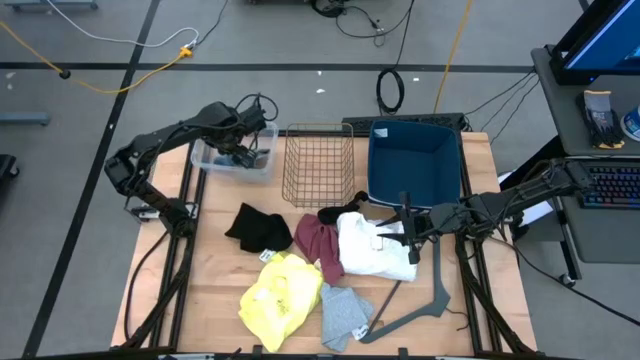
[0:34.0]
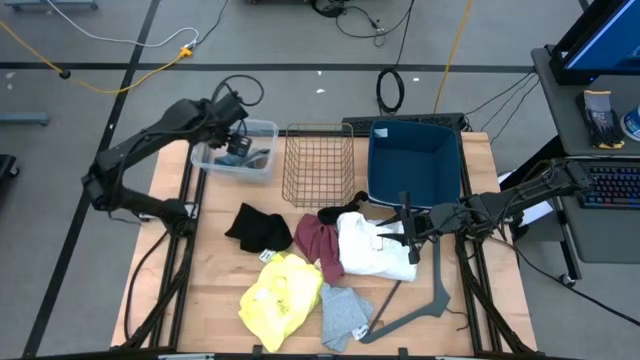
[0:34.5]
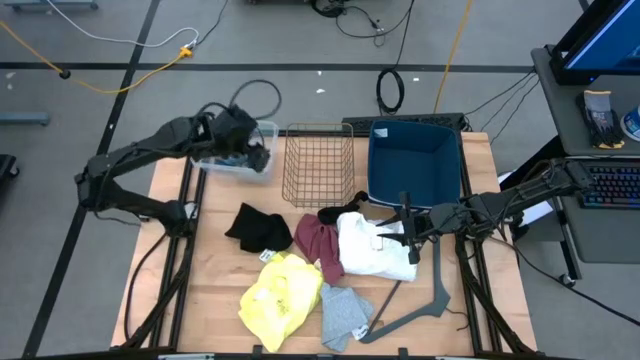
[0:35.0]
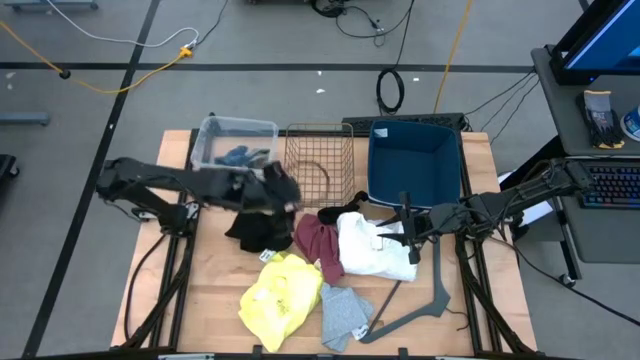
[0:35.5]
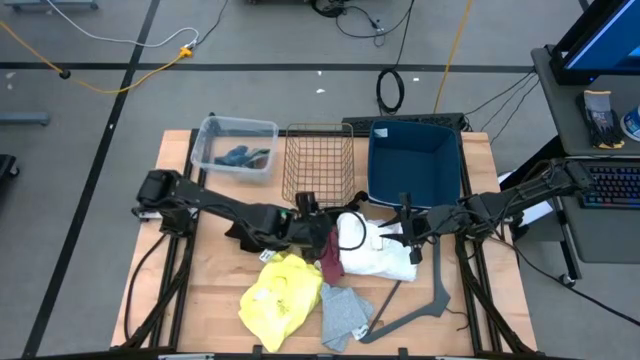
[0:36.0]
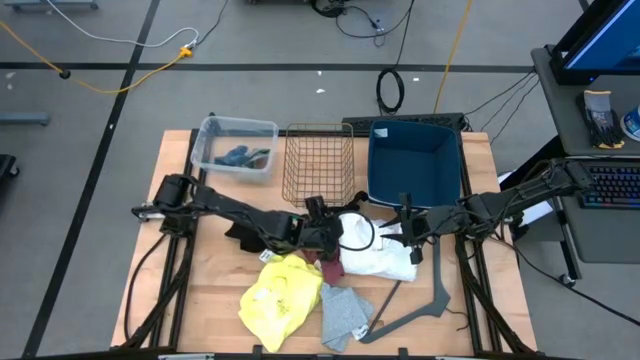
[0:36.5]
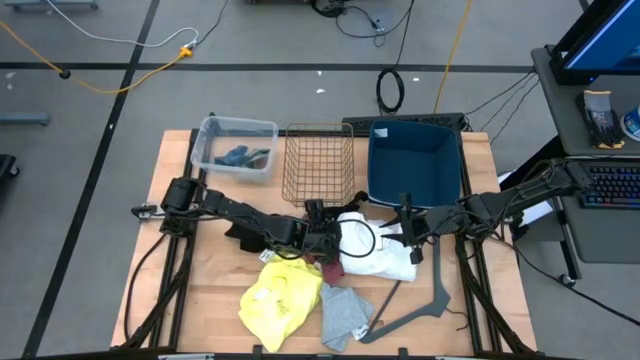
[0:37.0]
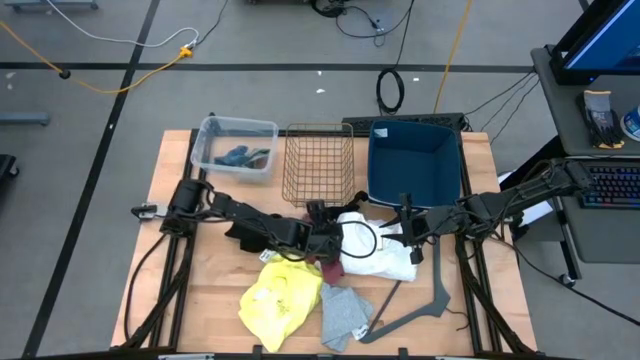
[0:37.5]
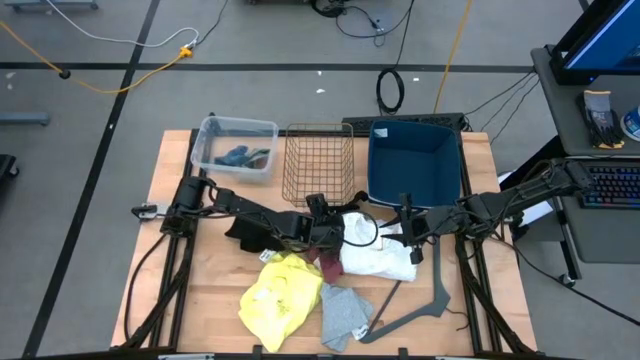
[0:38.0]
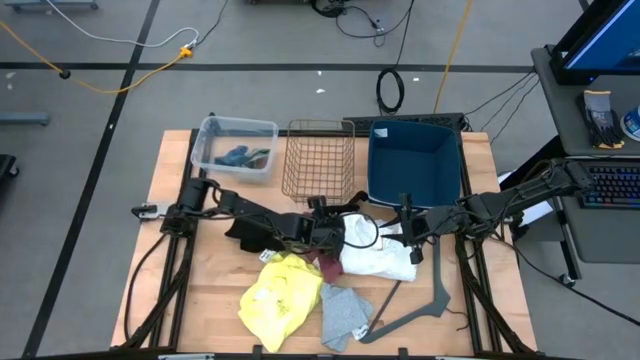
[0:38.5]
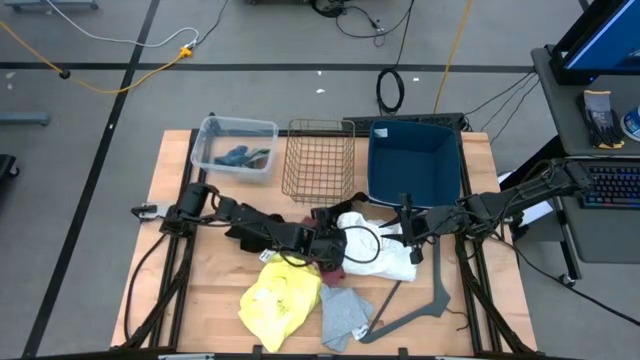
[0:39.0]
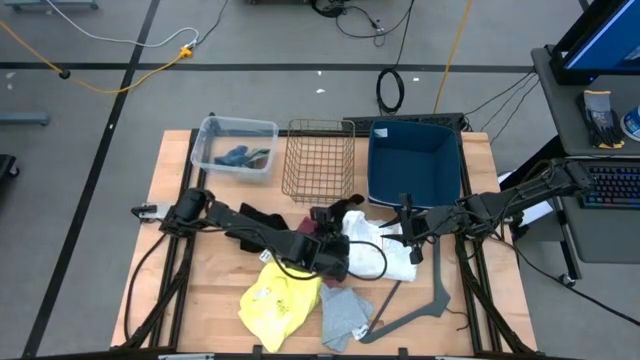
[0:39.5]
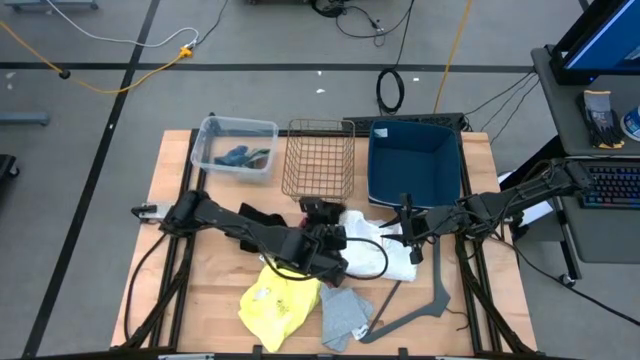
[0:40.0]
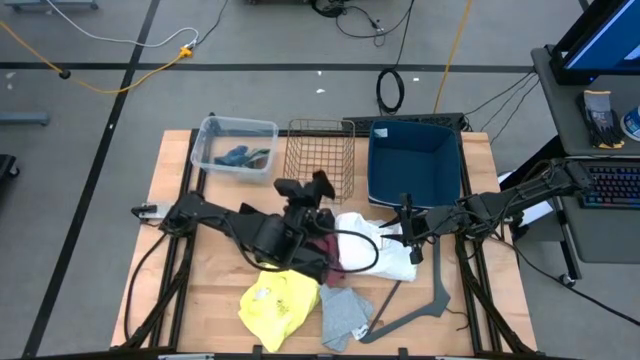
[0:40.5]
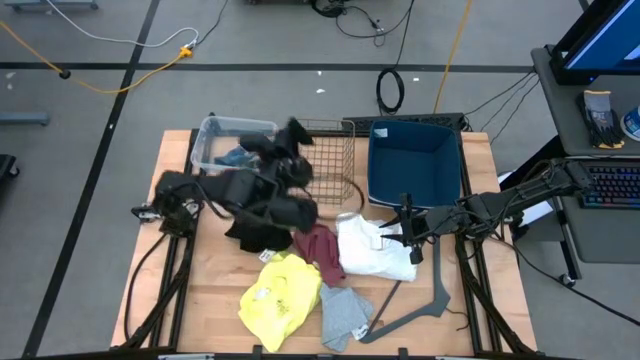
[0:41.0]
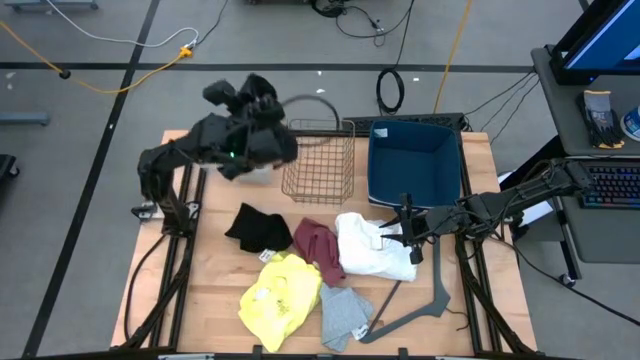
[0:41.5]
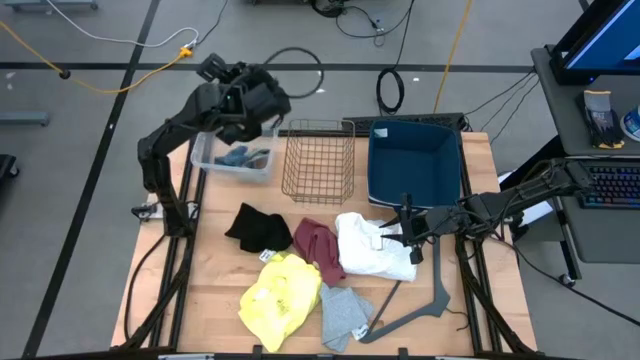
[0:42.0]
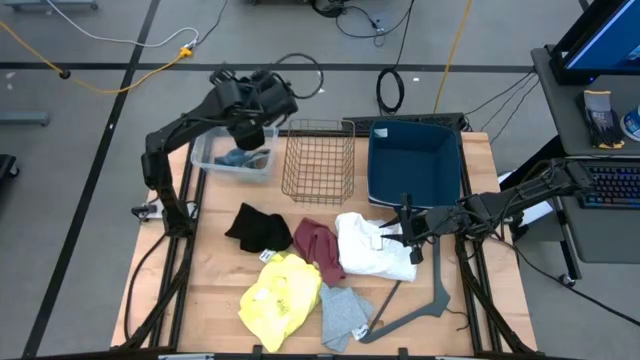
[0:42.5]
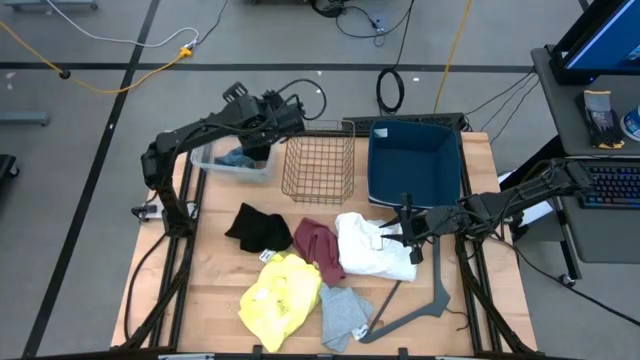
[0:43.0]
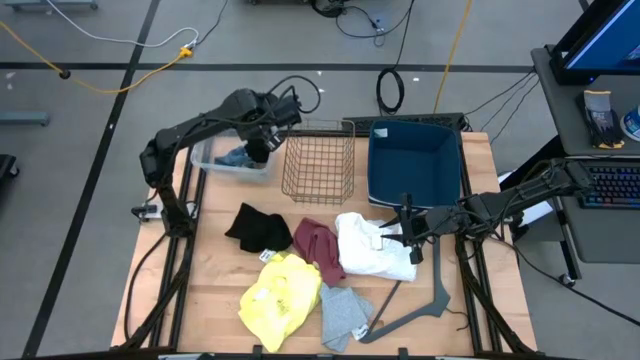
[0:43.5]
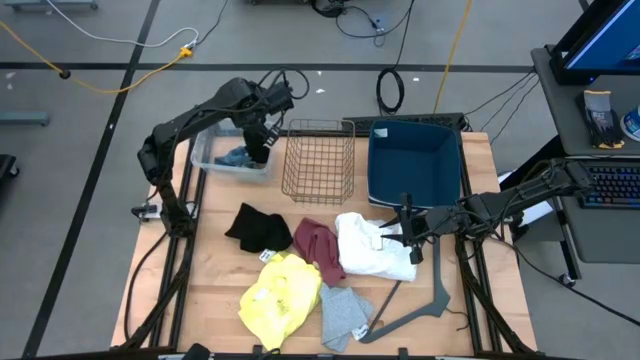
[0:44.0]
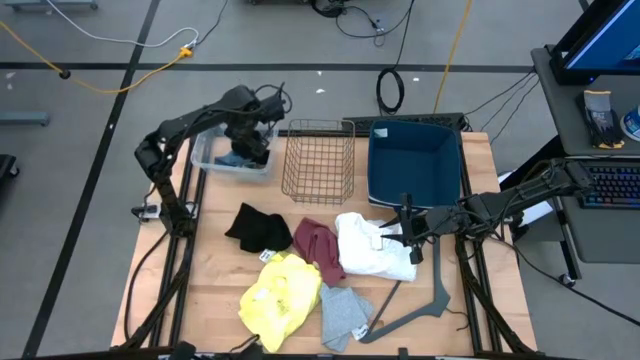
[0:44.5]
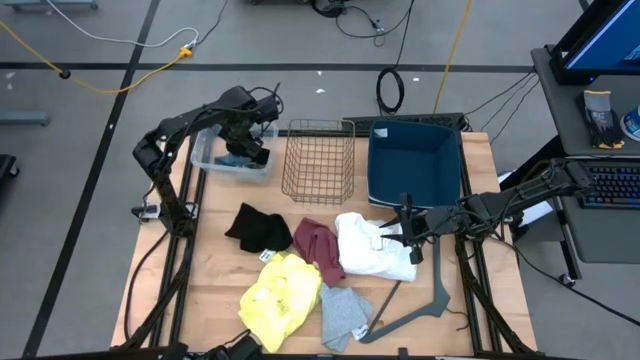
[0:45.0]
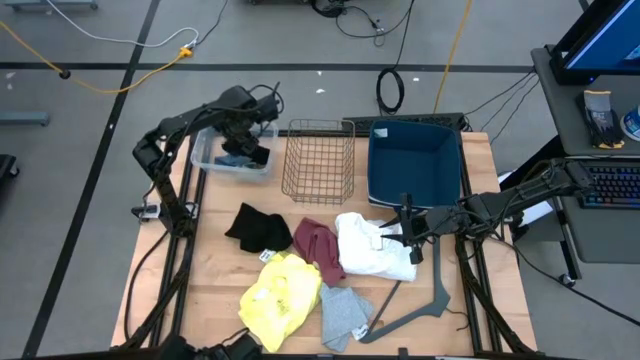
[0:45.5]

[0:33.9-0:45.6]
Task: Pick & Place Cloths
Put the black sock into the transparent bin

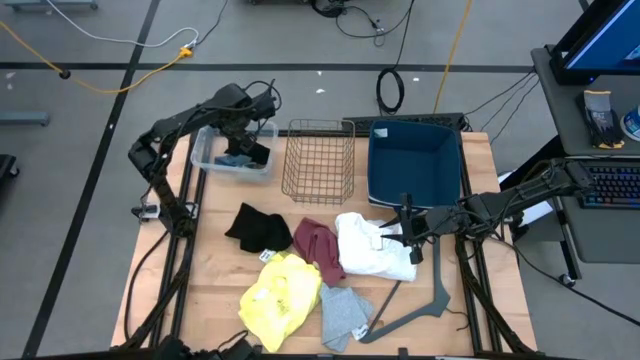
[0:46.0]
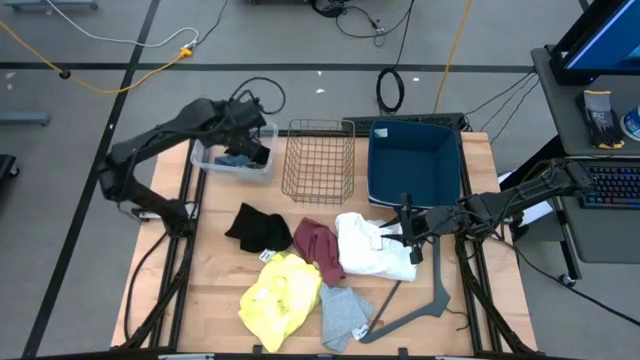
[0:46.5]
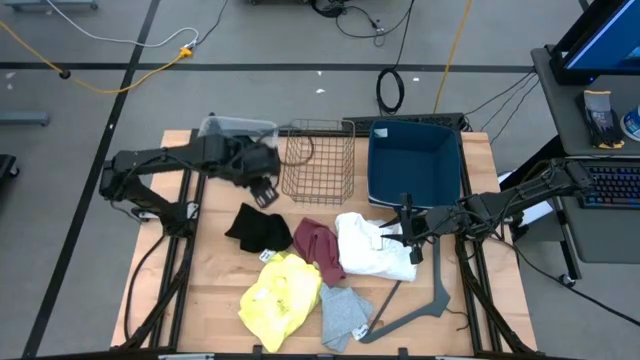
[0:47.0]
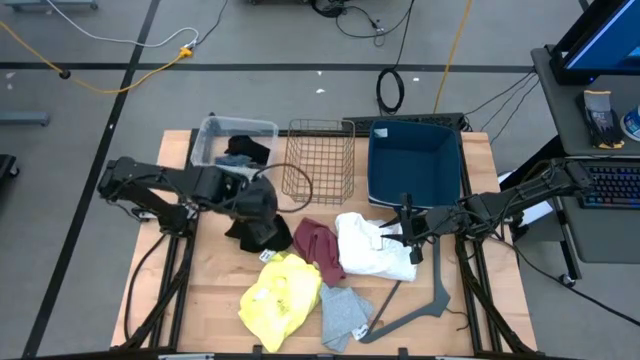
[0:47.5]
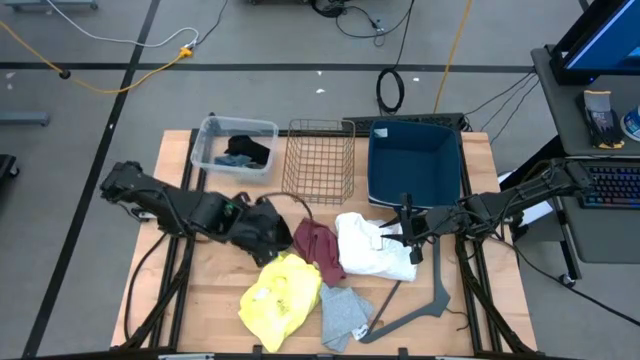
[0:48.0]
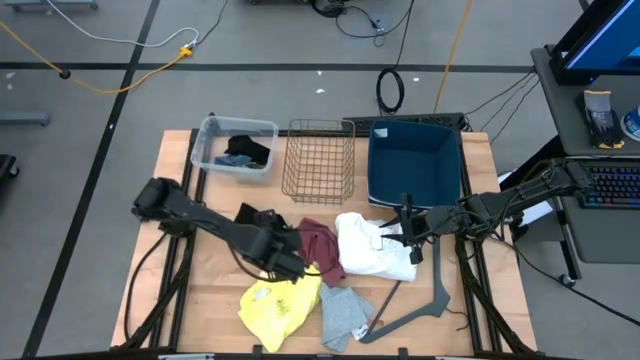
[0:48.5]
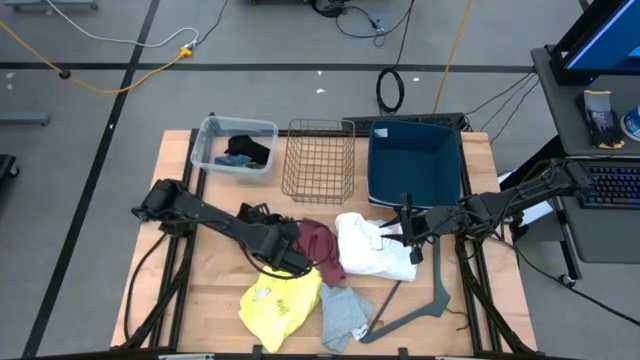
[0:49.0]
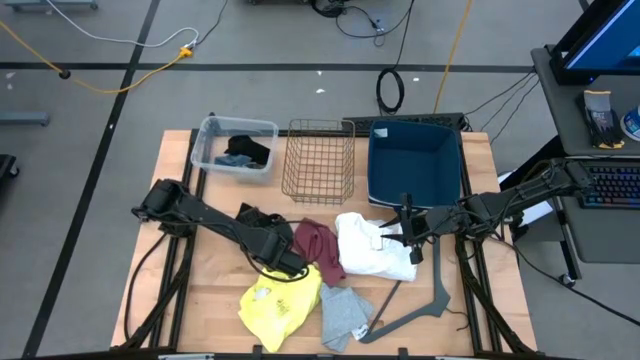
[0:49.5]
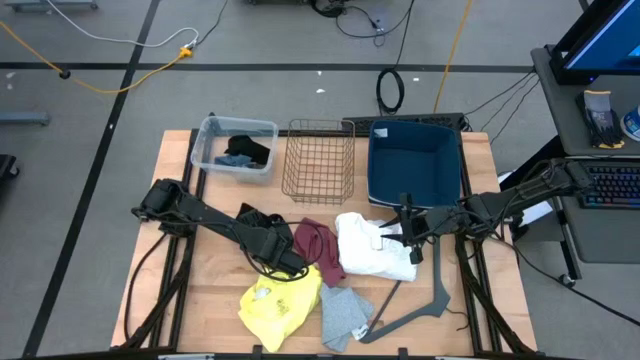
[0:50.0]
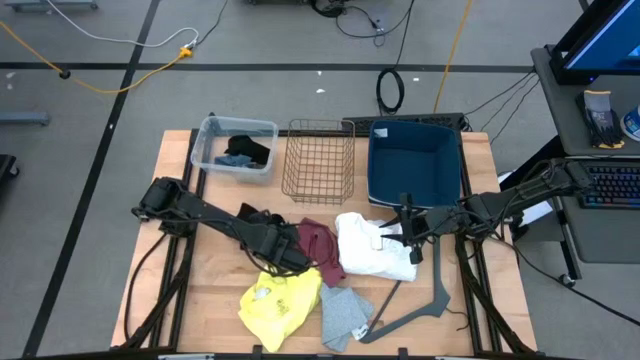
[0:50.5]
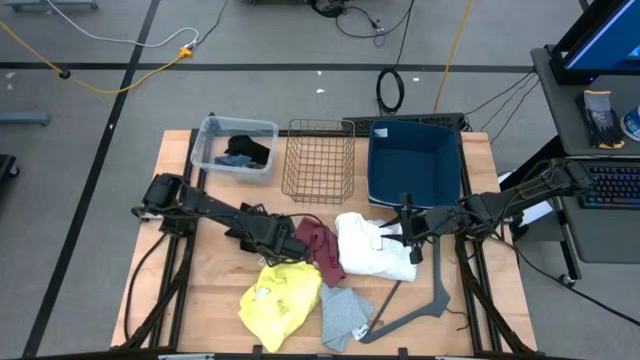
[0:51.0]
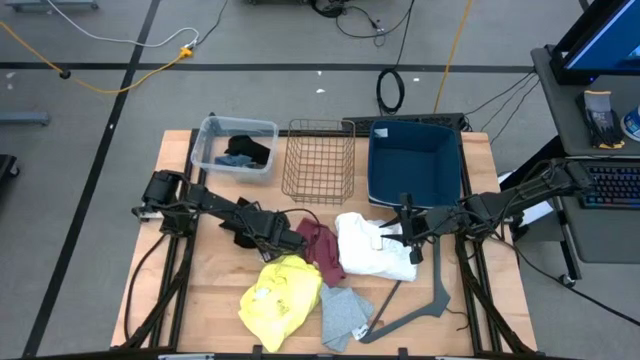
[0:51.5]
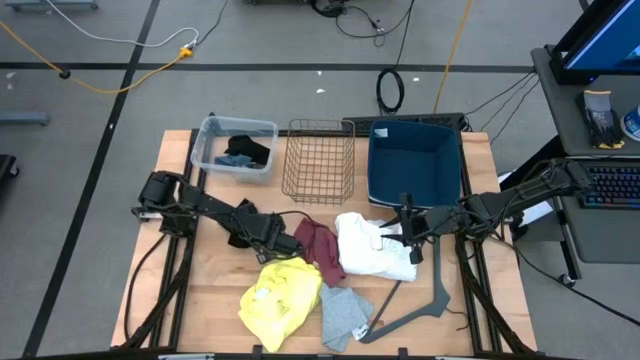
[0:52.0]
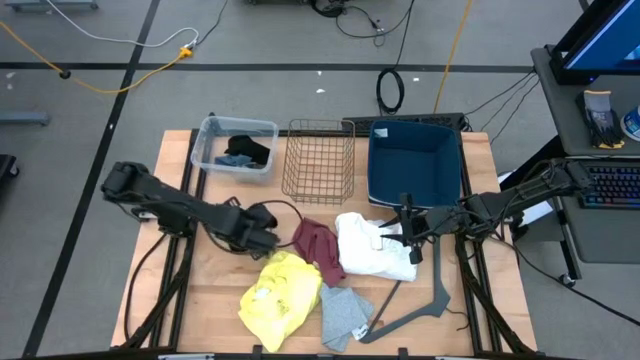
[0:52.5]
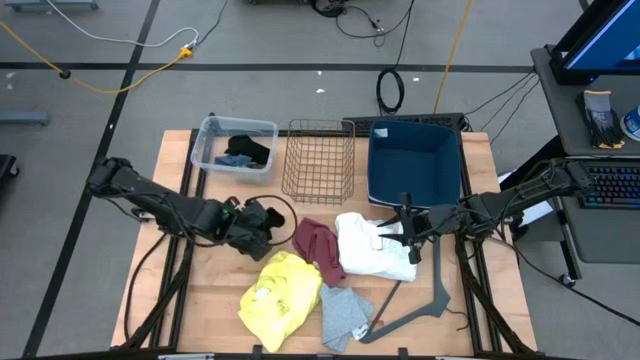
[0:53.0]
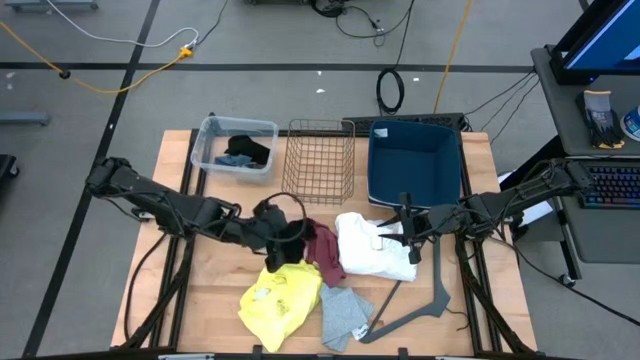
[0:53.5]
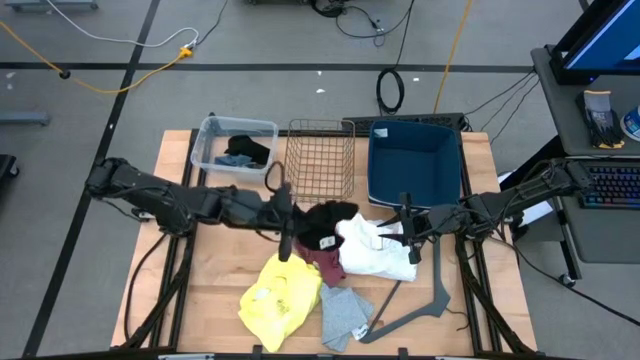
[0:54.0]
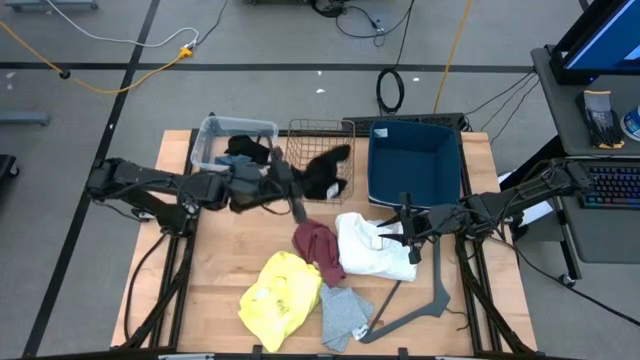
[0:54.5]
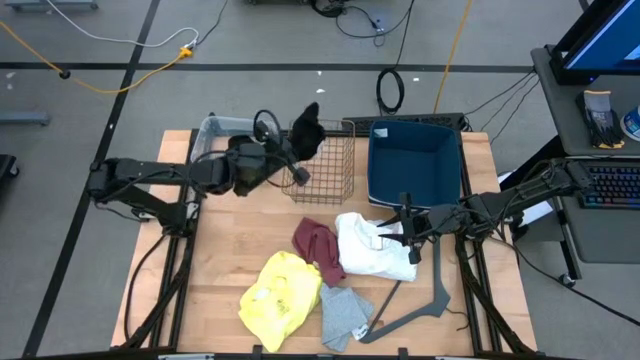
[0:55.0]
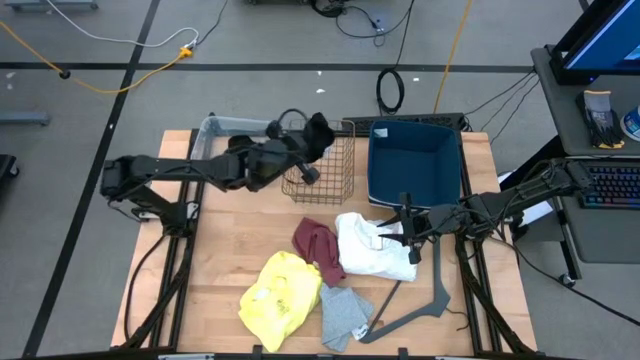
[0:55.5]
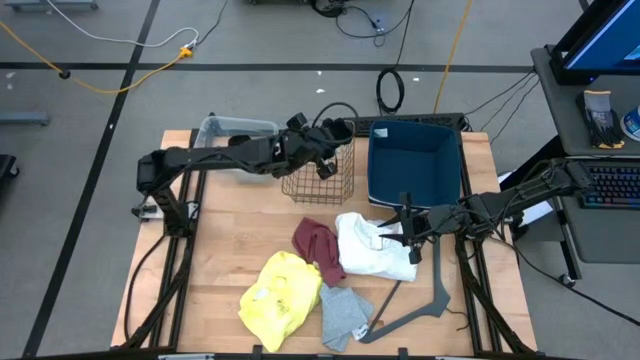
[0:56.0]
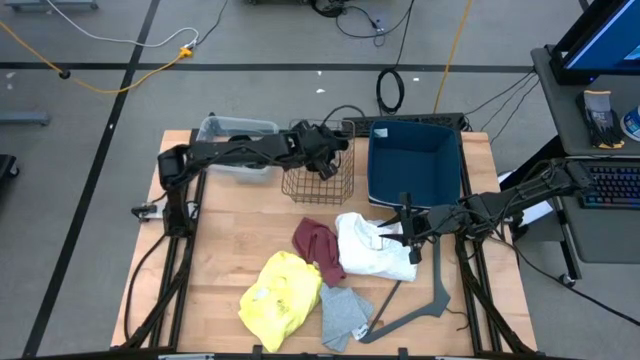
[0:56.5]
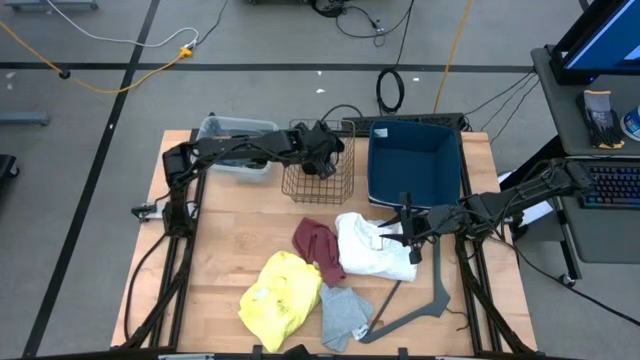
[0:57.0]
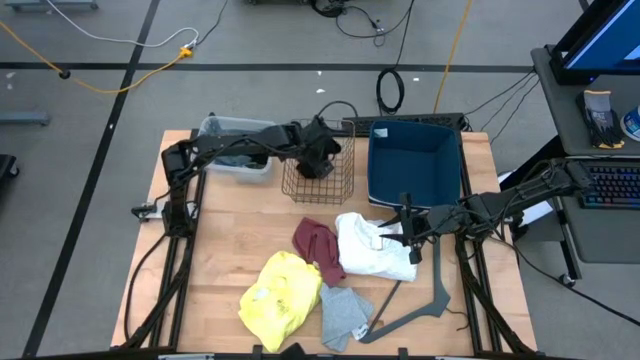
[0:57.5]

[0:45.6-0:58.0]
Put the black underwear into the black mesh basket
